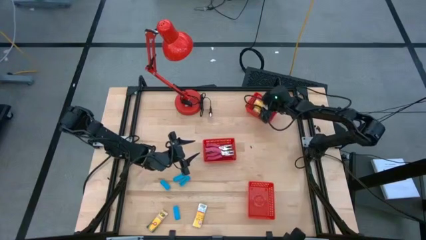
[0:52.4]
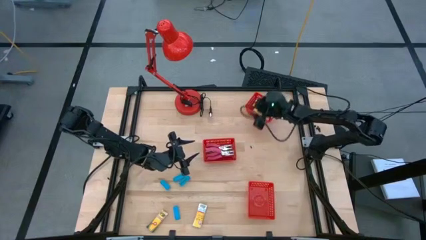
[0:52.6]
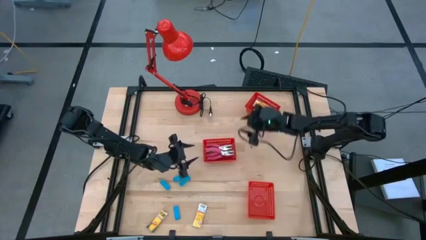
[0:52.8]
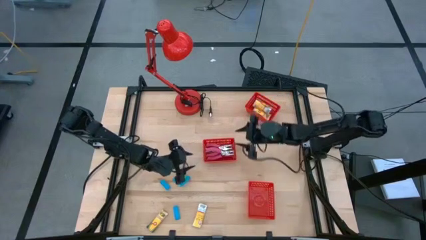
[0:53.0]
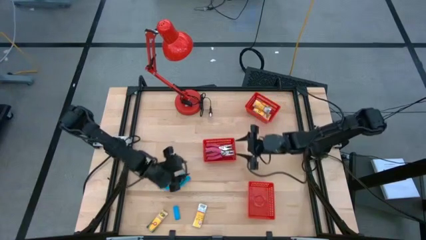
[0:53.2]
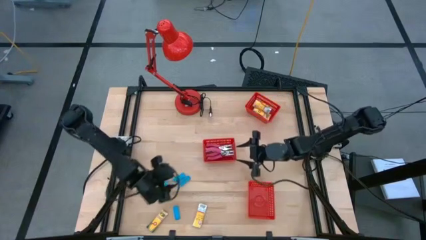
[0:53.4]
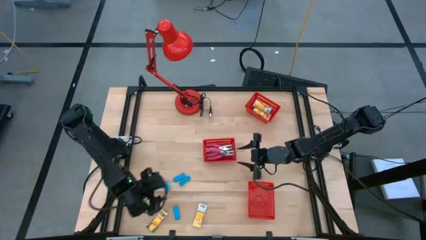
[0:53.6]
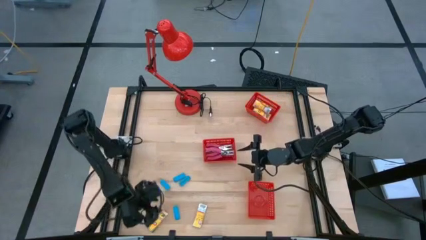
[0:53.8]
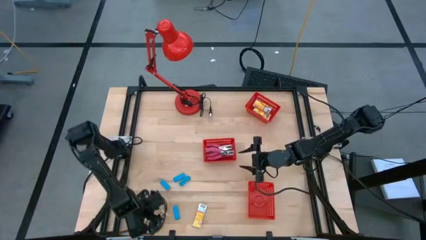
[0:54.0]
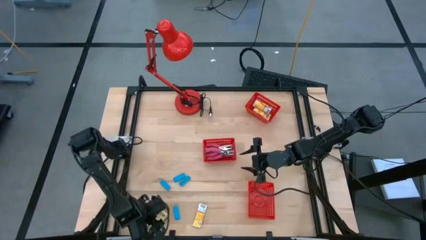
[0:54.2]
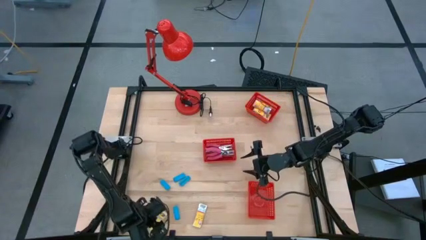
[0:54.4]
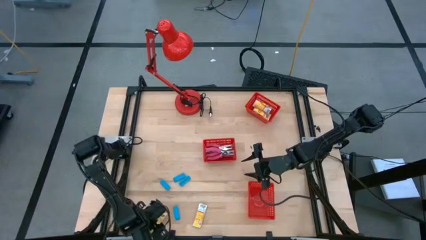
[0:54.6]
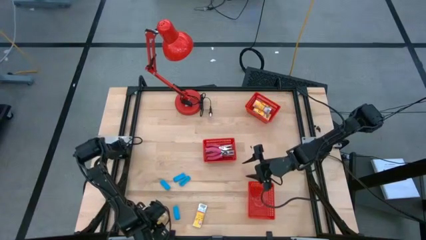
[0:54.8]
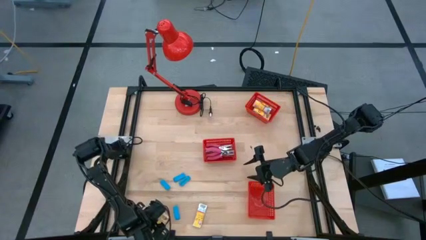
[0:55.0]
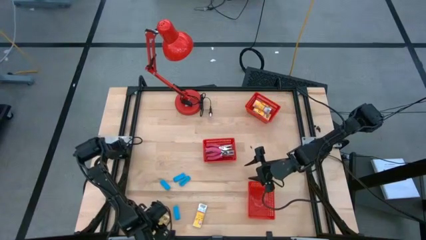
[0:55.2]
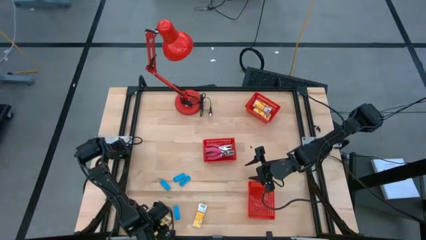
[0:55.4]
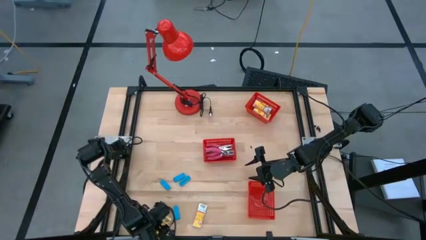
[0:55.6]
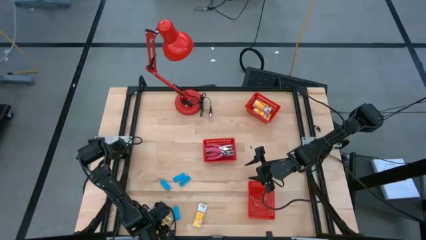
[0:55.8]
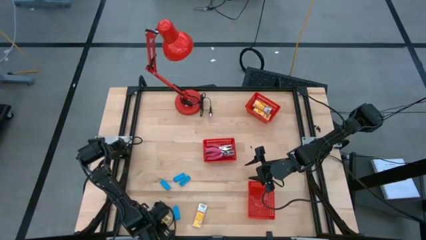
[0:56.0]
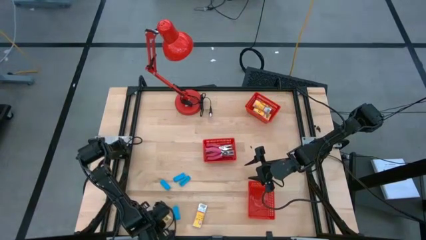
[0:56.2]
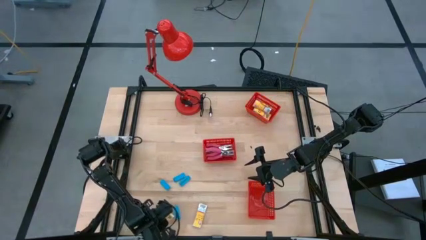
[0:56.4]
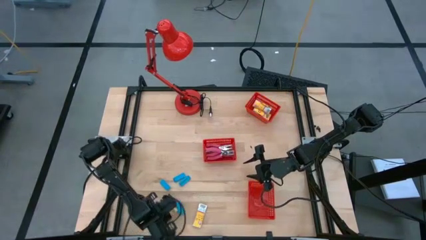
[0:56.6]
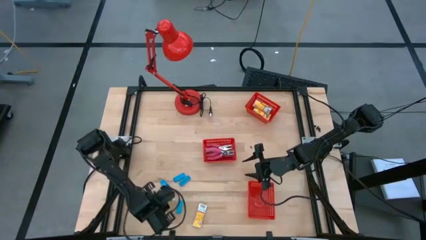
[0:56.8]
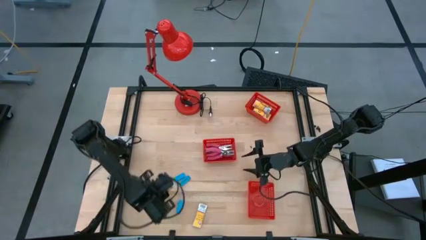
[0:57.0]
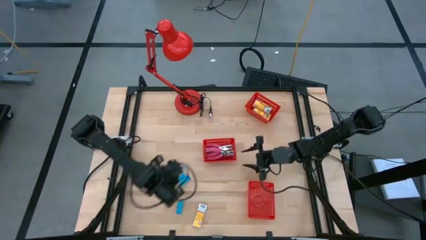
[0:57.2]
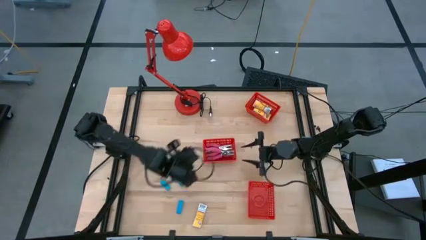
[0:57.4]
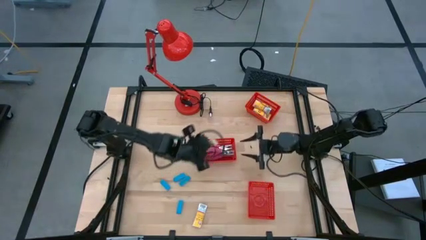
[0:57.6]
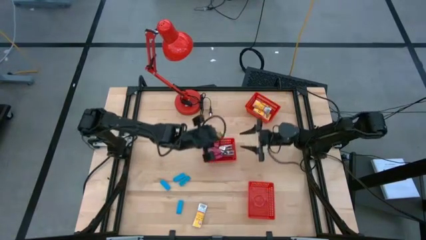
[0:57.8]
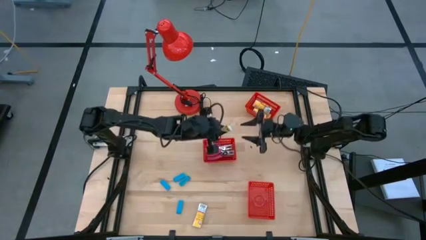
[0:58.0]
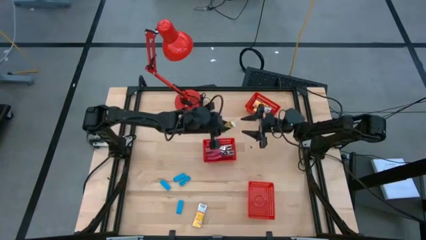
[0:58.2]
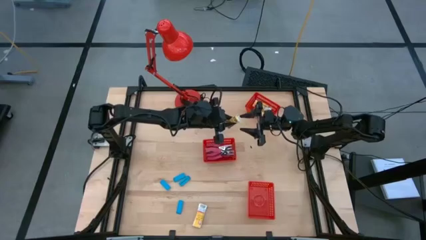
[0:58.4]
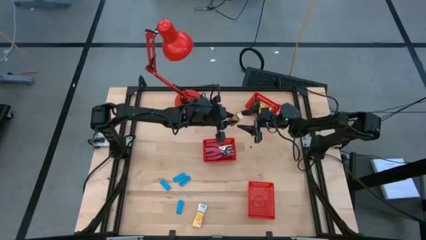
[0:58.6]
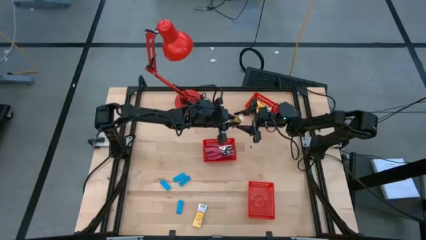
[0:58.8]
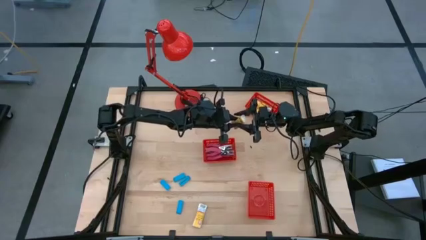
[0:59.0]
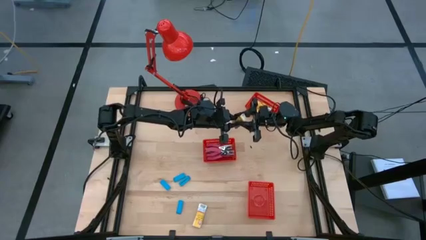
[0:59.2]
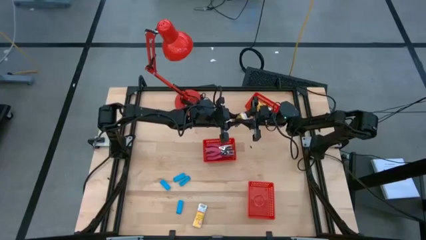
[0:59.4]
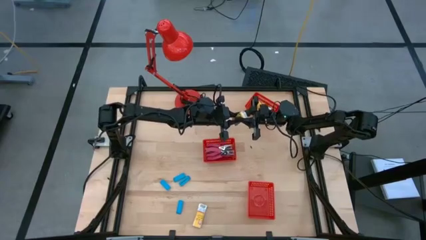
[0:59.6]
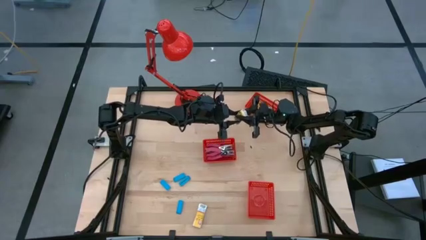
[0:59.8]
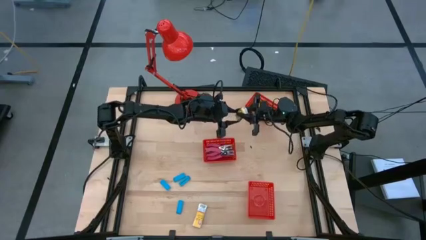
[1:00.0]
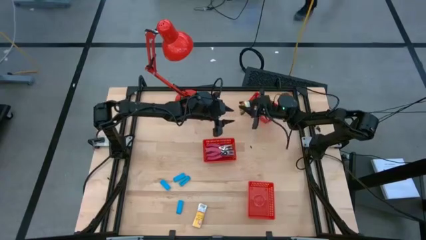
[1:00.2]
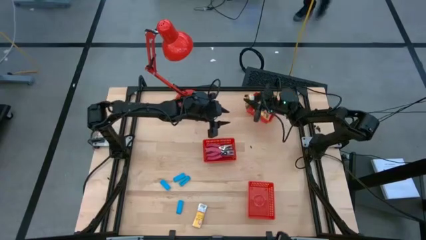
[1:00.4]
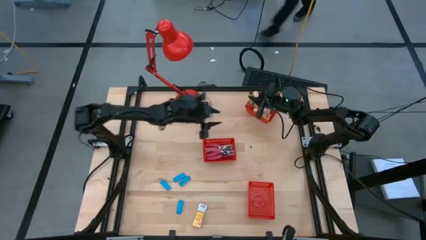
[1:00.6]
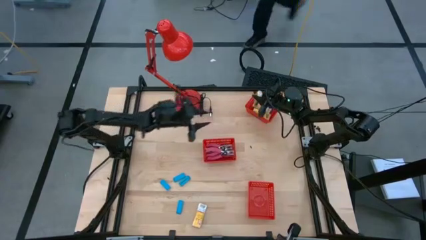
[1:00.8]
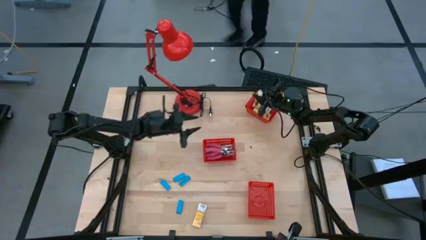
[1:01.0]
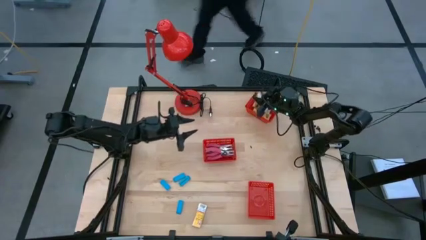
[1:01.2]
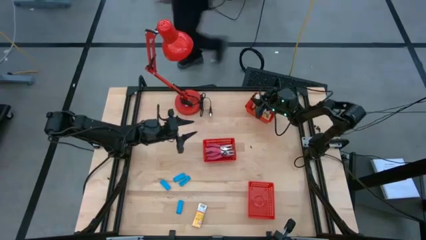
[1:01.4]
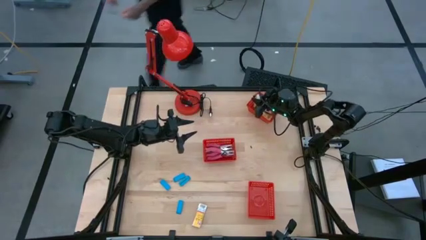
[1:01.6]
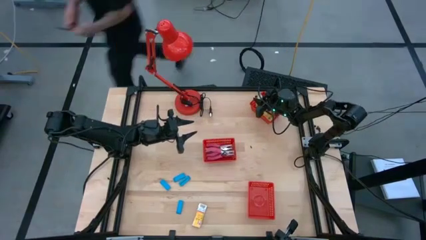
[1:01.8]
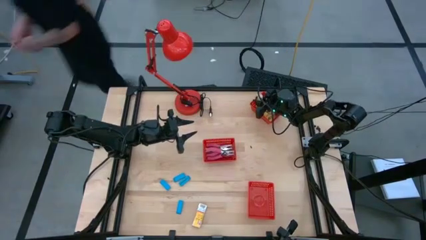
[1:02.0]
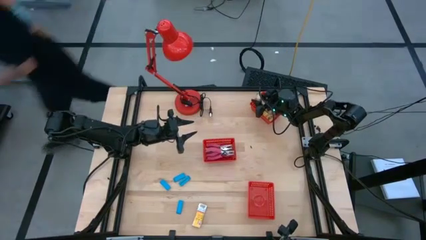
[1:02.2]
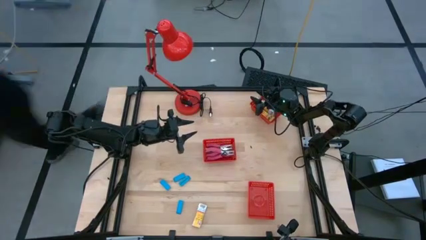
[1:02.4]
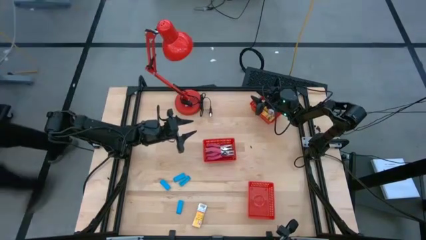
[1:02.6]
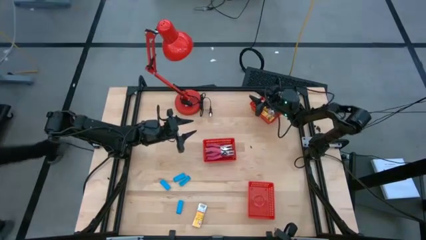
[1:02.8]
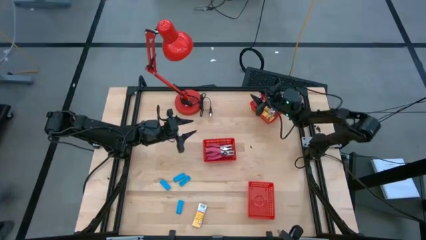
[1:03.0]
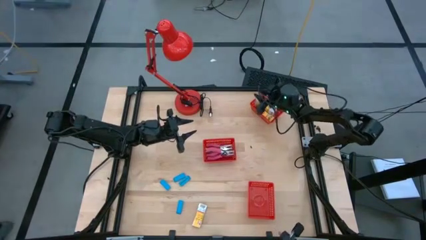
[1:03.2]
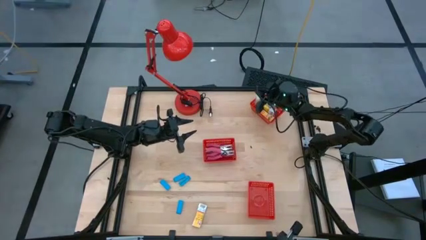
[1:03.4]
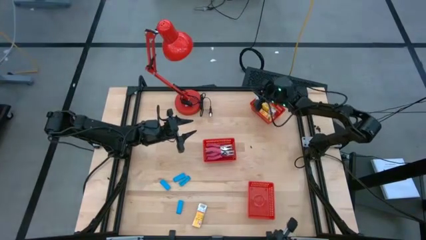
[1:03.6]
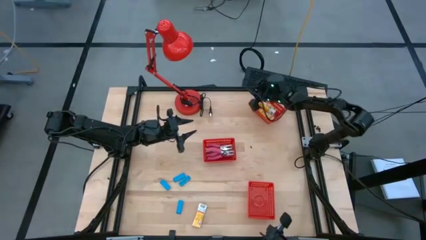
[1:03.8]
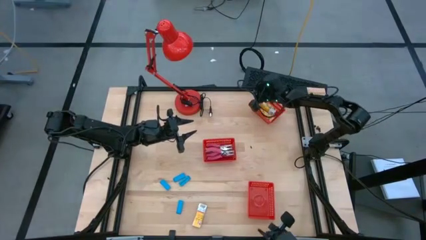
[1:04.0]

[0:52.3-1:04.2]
Task: Pick & Place School Supplies
Put the yellow crayon box into the top red bin
